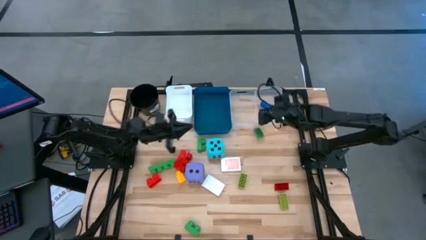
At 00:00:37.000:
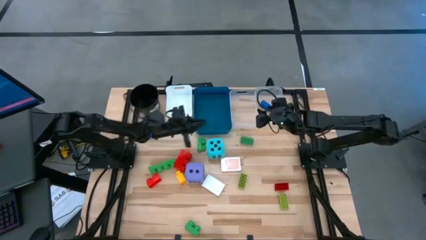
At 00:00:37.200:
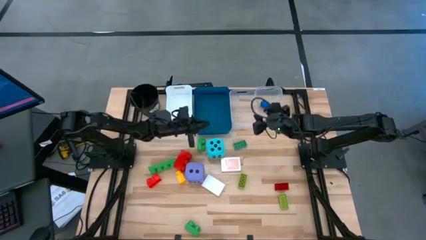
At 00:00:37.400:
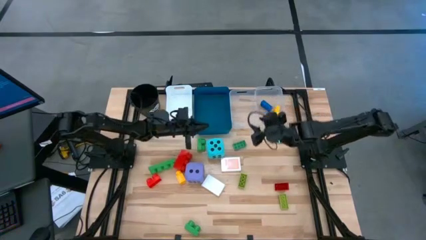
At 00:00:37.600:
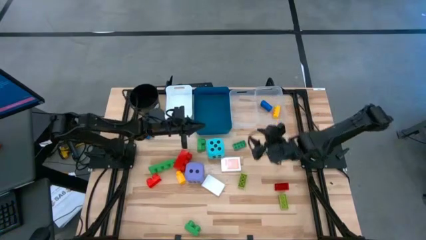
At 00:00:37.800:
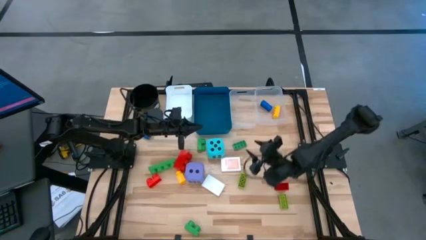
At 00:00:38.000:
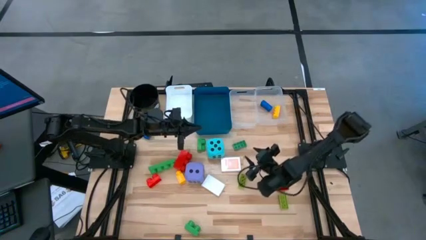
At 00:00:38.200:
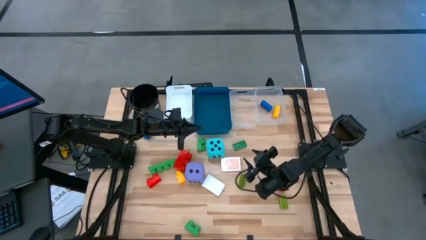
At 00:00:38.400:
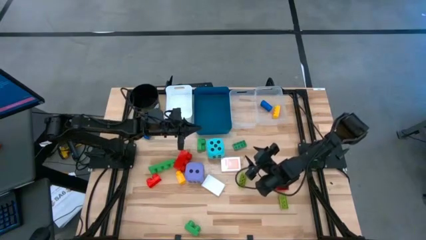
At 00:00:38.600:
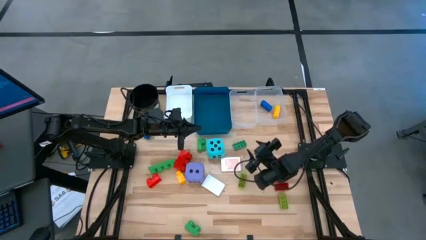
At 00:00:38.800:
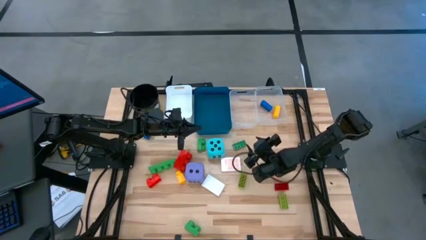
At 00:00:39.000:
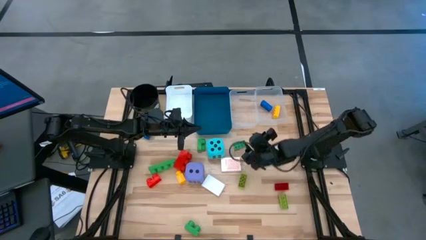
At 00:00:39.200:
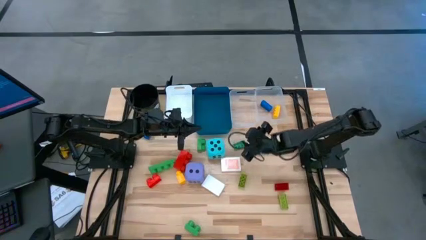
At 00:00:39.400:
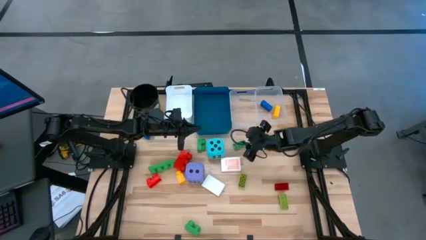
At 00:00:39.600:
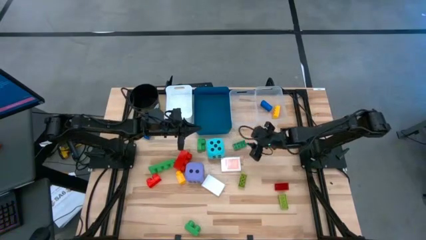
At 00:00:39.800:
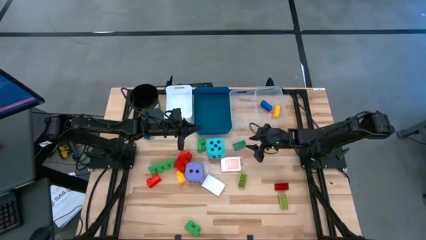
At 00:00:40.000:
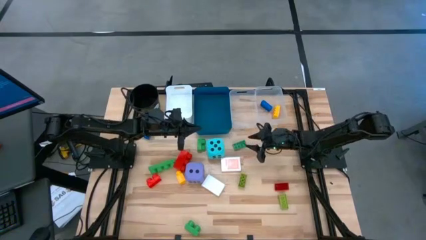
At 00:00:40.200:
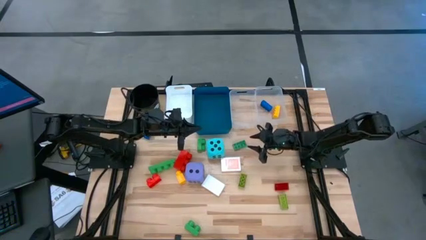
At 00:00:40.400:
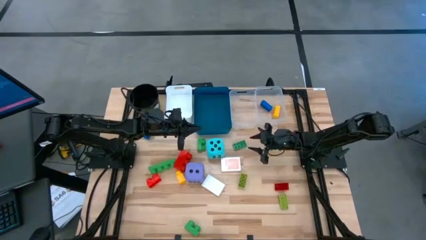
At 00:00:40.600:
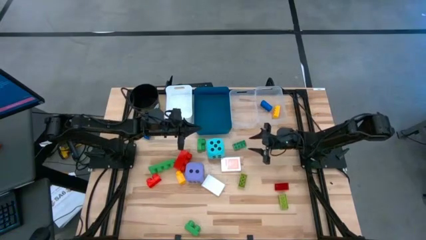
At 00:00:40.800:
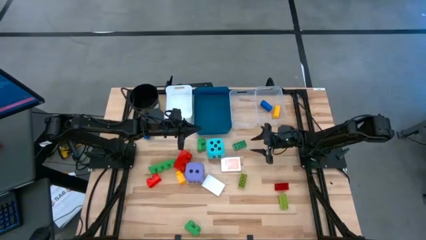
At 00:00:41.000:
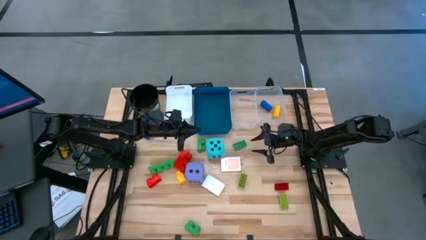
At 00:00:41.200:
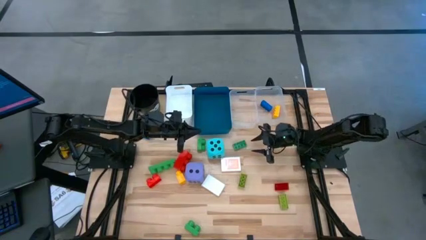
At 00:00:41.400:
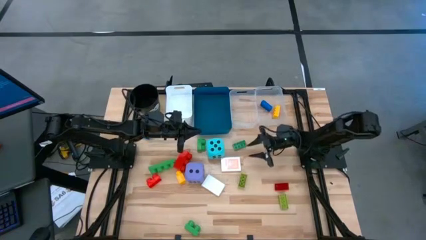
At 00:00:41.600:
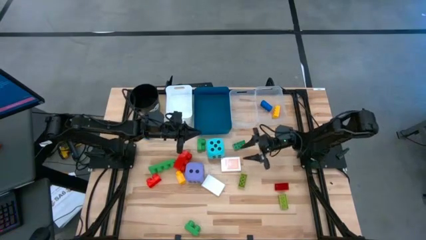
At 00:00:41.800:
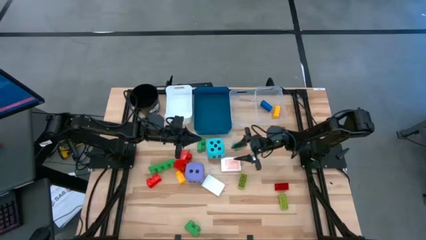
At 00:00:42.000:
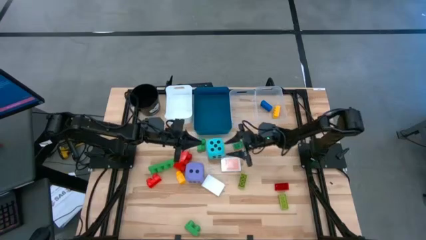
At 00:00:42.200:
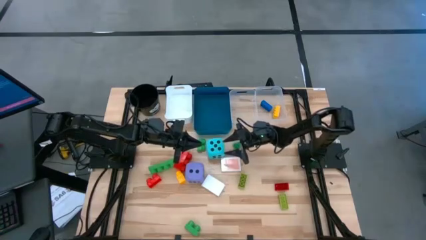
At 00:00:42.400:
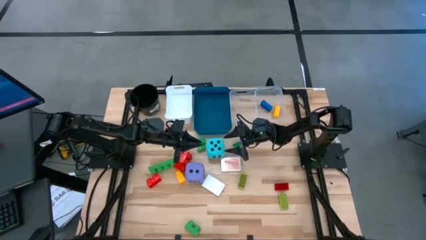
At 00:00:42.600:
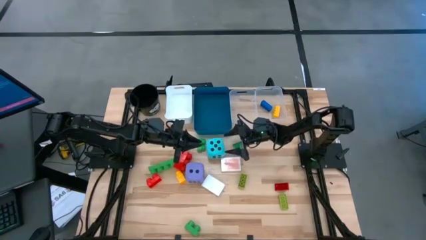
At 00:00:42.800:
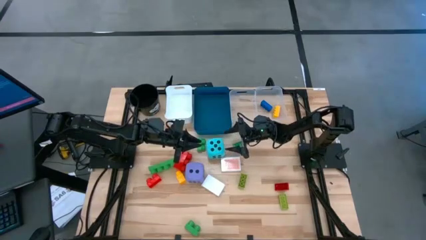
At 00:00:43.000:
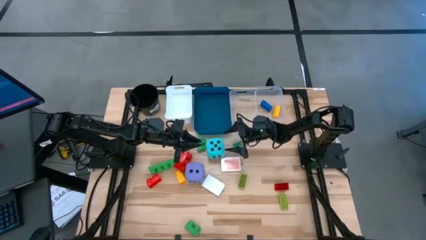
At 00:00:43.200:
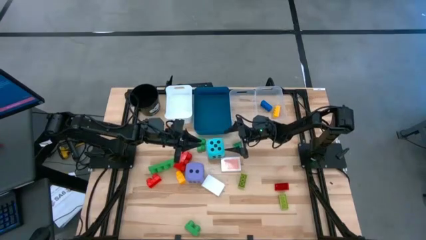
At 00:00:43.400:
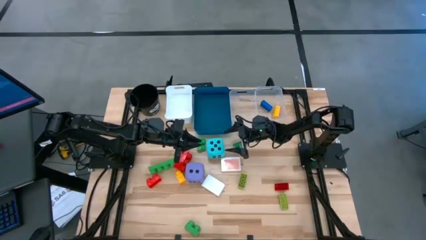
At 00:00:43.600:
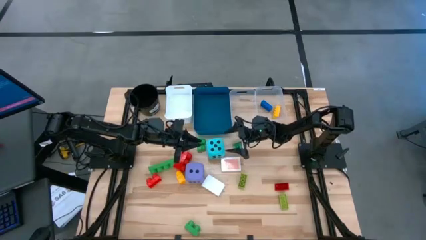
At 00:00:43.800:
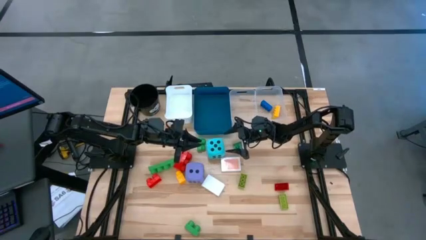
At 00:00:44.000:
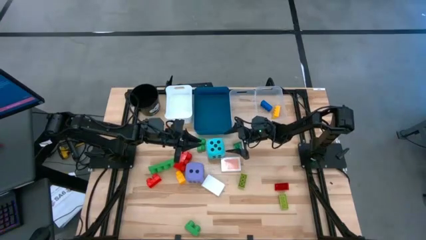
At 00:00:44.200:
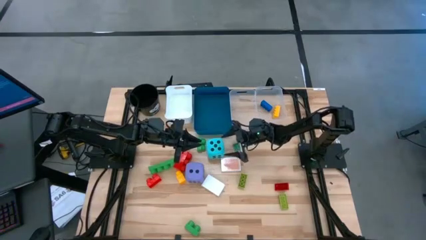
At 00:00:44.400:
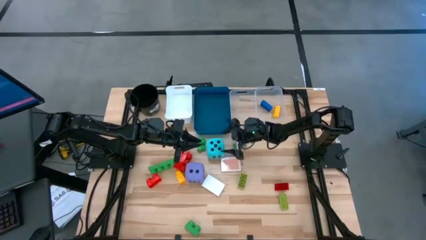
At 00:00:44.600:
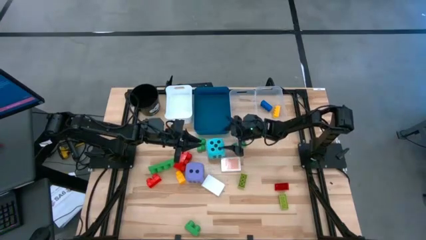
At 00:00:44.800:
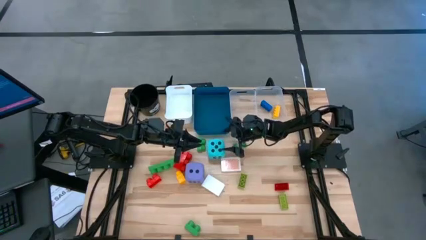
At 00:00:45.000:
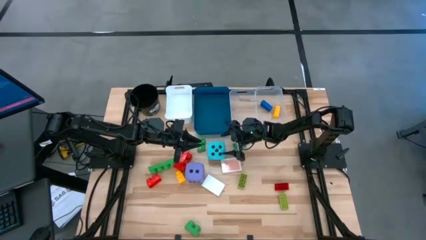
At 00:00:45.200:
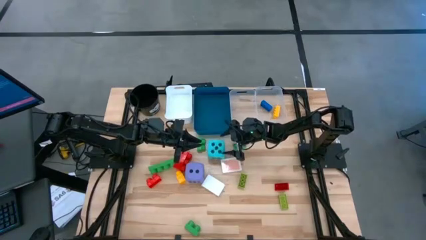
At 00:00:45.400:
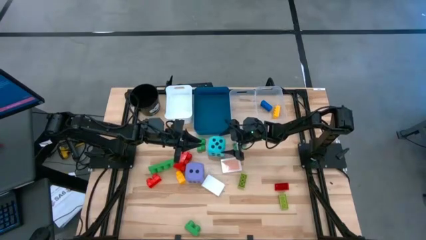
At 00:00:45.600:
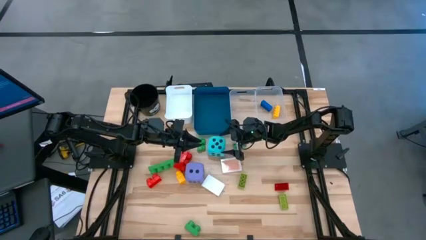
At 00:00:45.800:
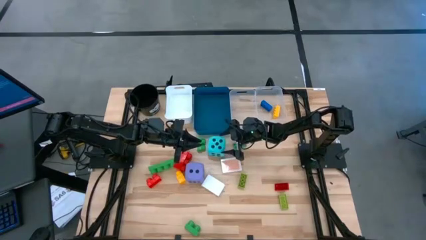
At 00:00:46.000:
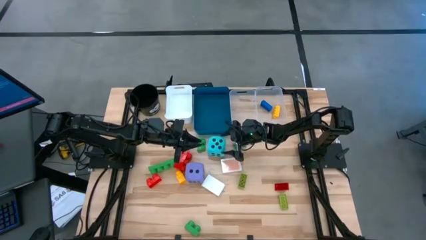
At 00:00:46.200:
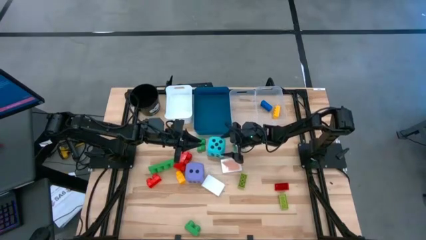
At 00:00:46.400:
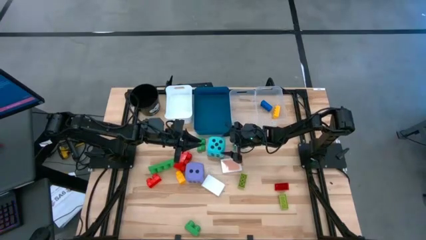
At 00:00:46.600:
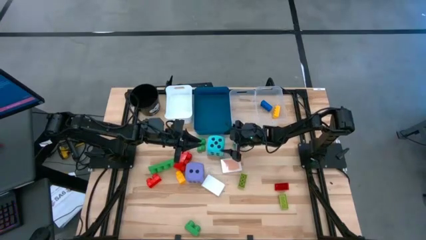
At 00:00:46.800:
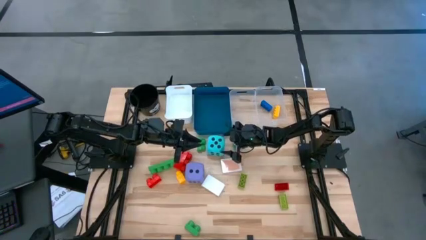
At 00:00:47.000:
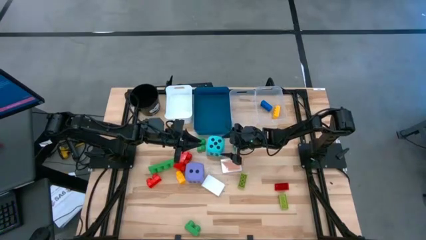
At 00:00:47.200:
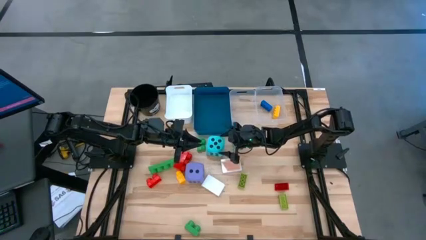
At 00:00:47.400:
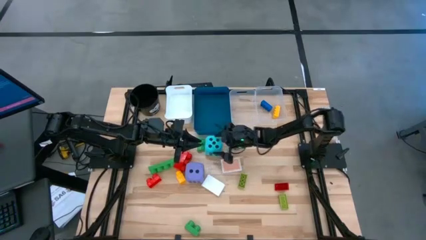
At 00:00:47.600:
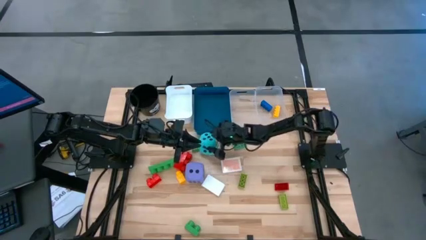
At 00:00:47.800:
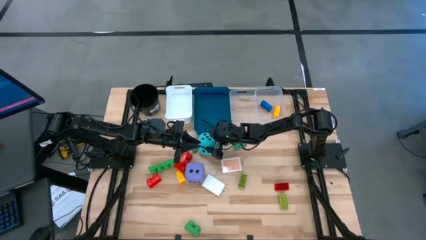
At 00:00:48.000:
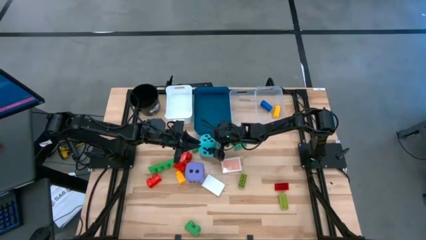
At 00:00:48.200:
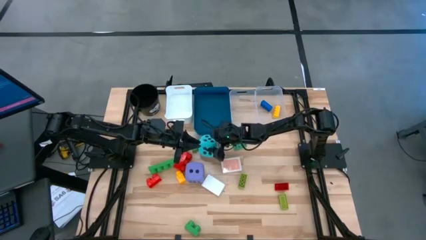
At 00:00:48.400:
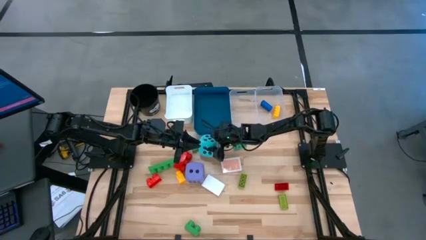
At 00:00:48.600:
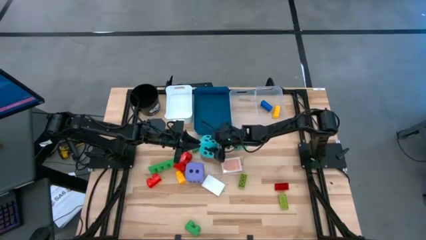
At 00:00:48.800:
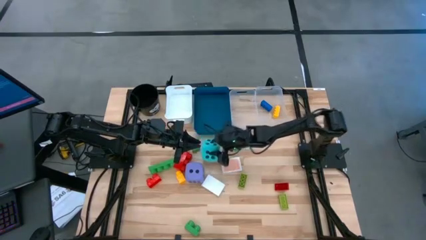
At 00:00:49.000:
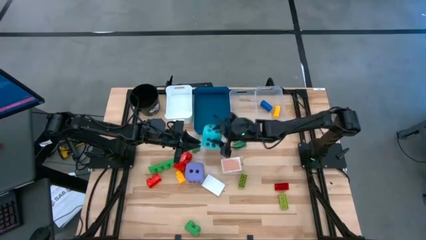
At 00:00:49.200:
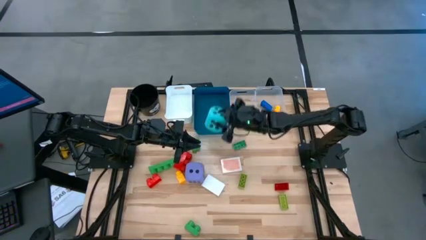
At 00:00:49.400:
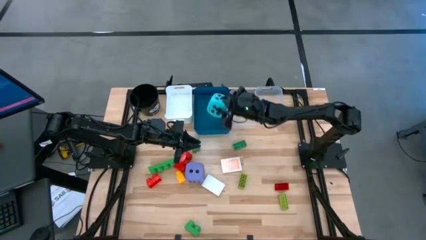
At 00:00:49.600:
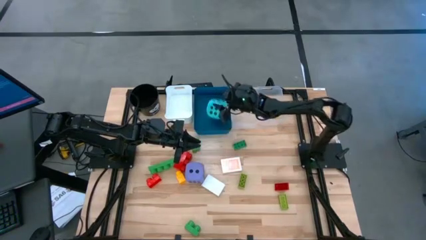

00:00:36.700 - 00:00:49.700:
Task: Pick & Place Toys
Put the blue dice into the blue bin

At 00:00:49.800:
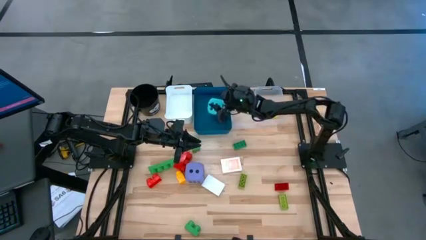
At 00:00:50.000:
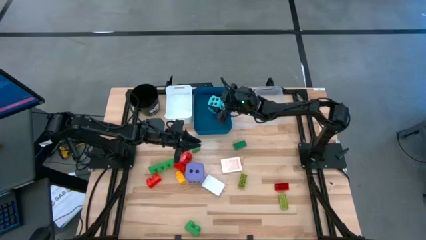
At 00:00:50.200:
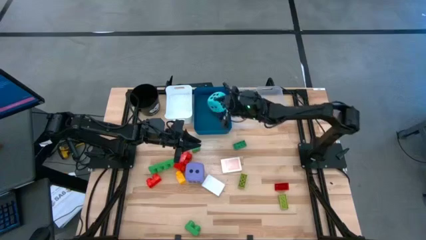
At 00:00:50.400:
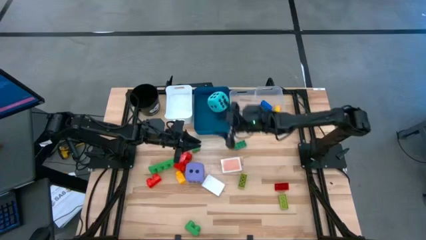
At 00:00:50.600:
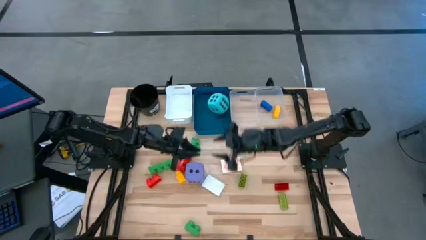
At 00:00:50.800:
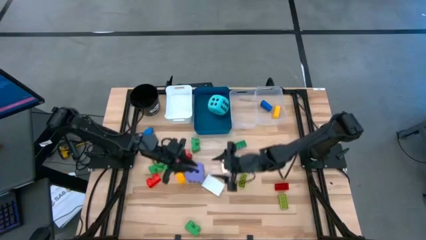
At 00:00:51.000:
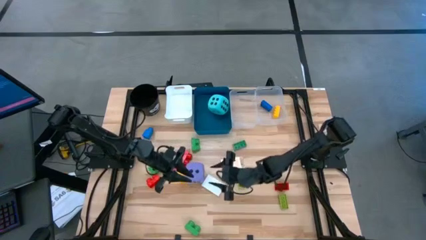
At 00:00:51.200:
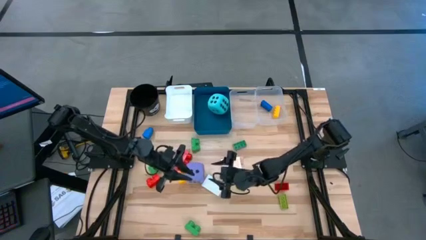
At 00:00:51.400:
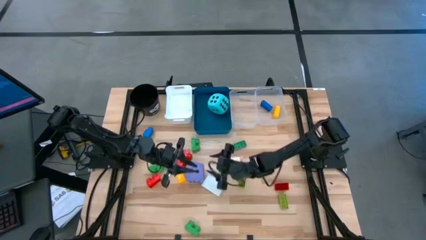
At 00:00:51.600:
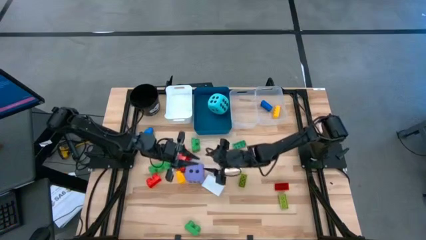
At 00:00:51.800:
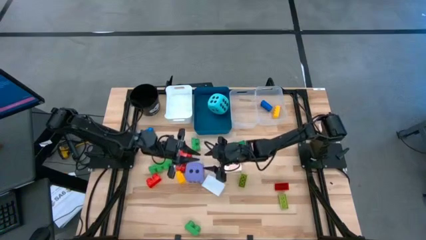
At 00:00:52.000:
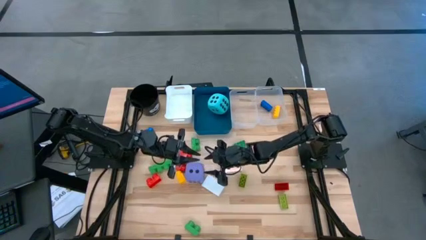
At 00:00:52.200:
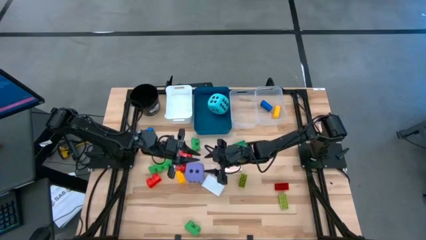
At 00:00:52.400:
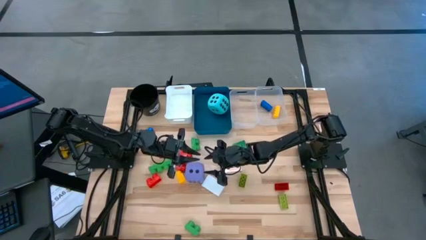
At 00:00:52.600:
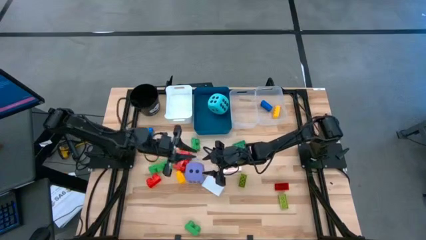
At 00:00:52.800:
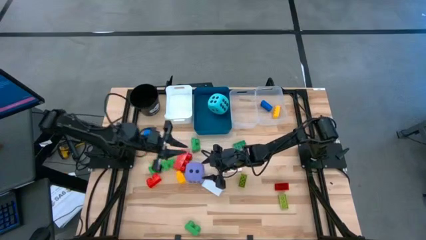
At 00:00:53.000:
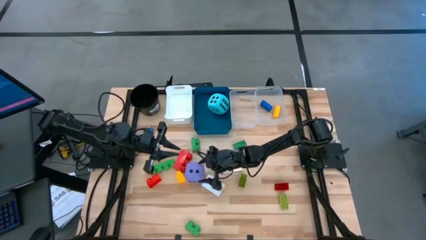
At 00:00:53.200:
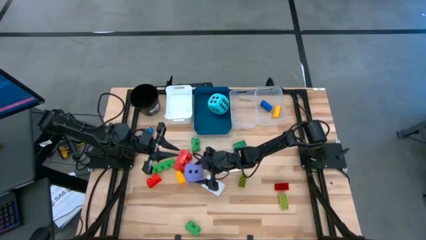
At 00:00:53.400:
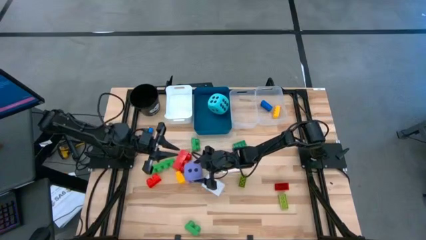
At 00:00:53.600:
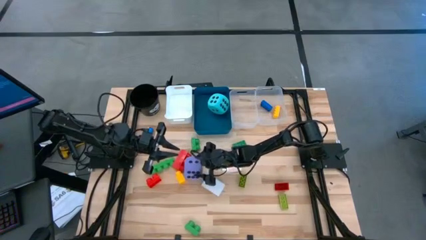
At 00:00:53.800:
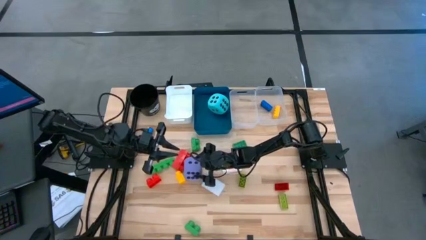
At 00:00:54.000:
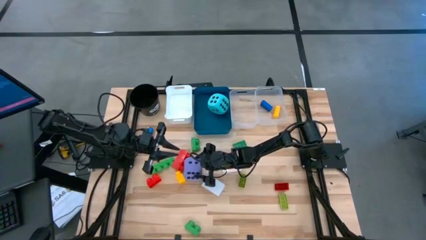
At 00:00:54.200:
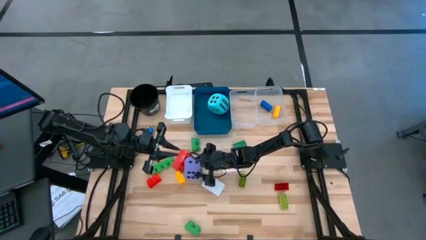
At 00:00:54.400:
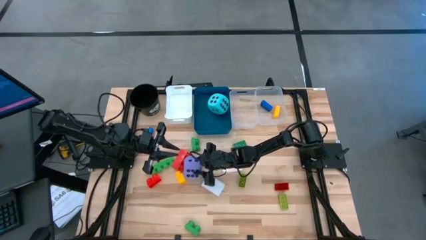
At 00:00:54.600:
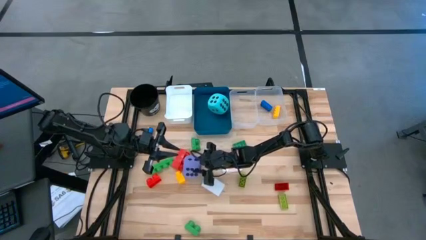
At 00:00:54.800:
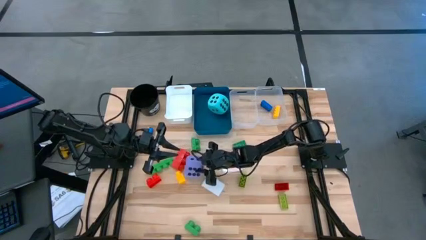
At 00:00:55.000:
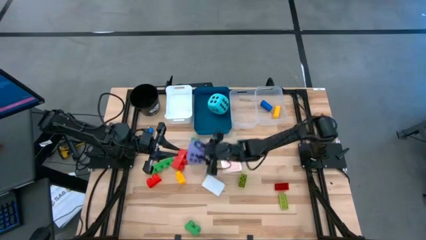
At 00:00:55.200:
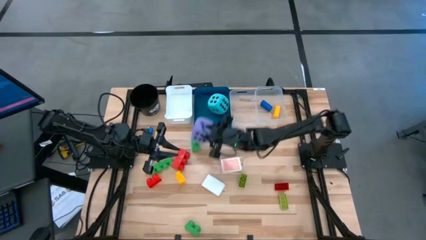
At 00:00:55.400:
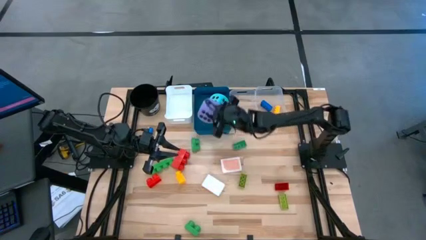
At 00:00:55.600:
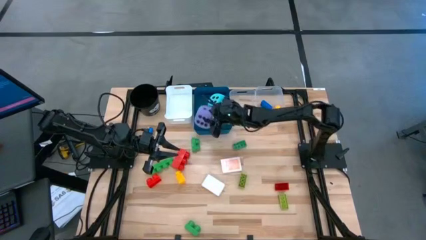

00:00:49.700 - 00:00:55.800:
Put the violet dice into the blue bin
